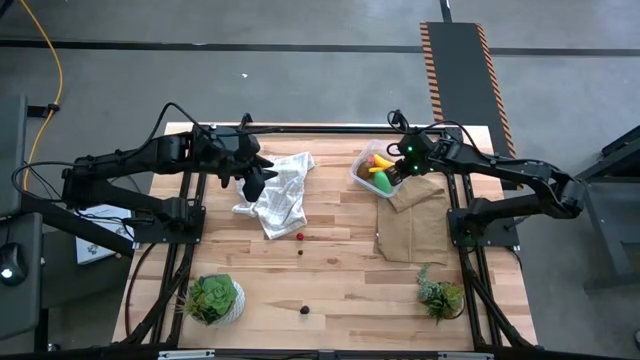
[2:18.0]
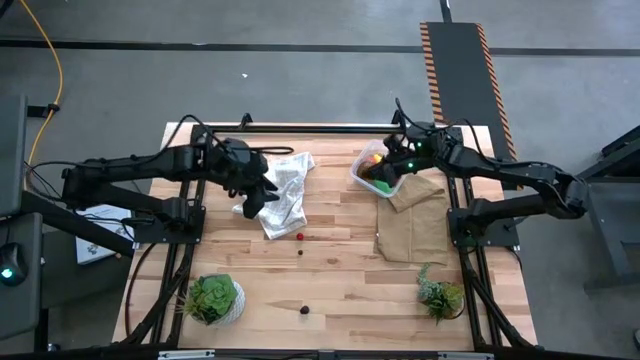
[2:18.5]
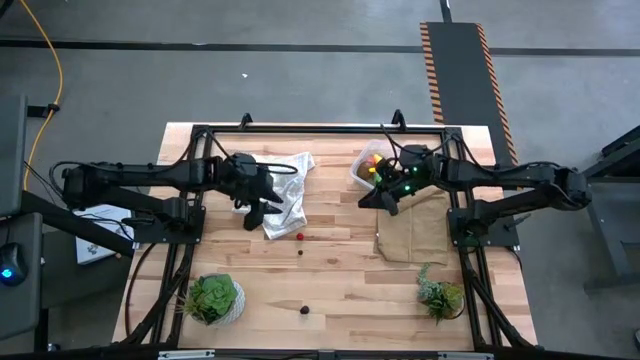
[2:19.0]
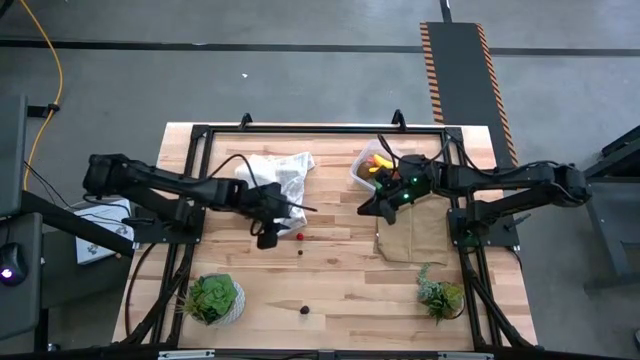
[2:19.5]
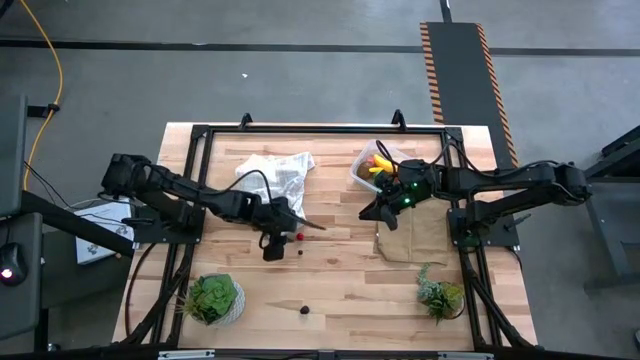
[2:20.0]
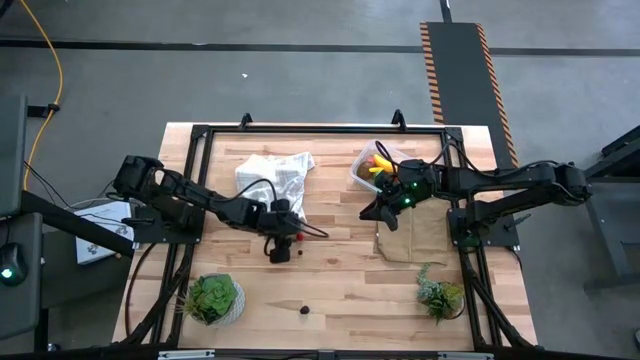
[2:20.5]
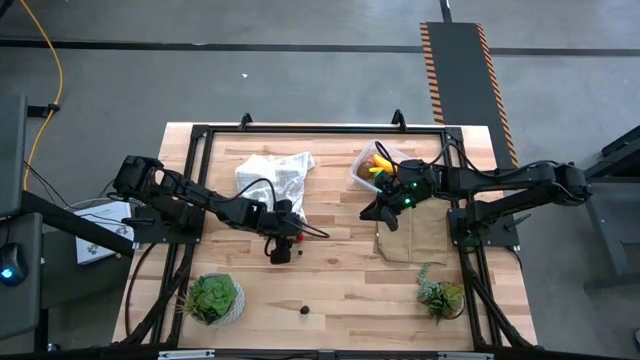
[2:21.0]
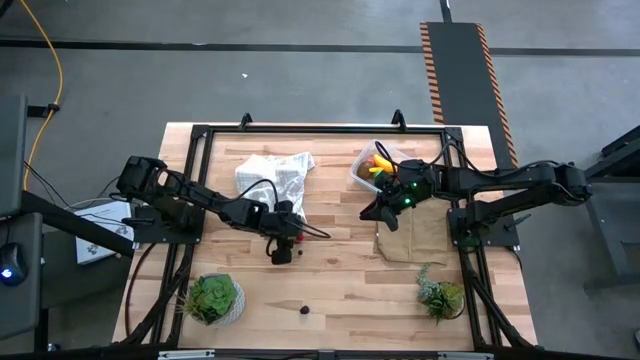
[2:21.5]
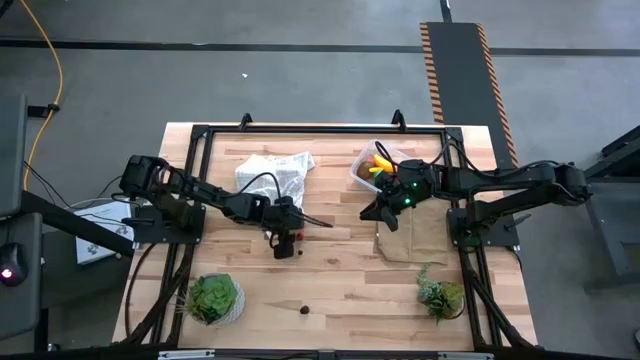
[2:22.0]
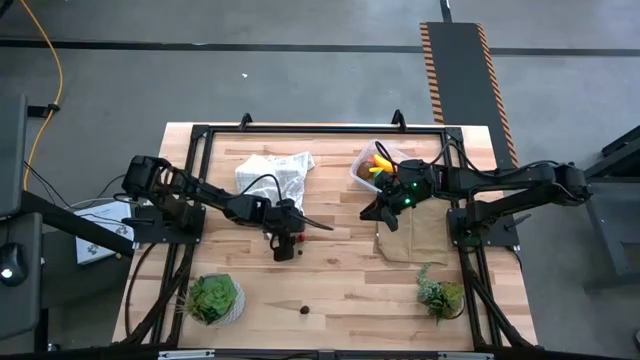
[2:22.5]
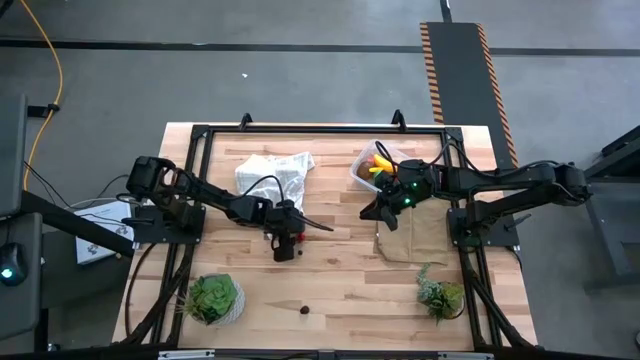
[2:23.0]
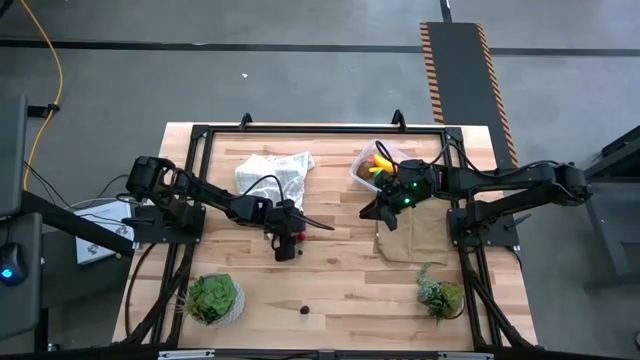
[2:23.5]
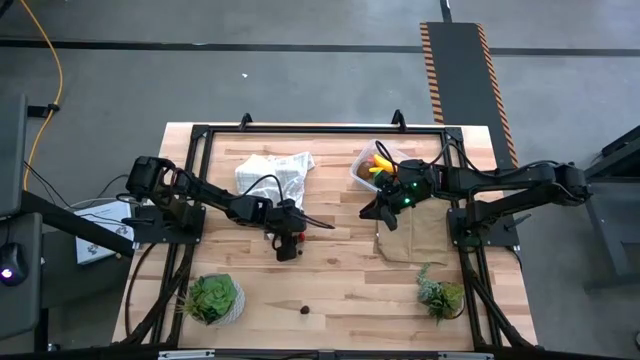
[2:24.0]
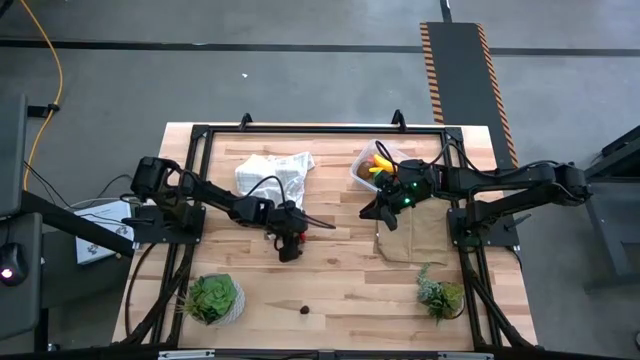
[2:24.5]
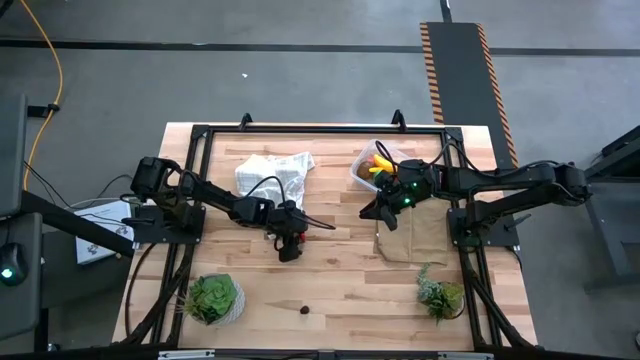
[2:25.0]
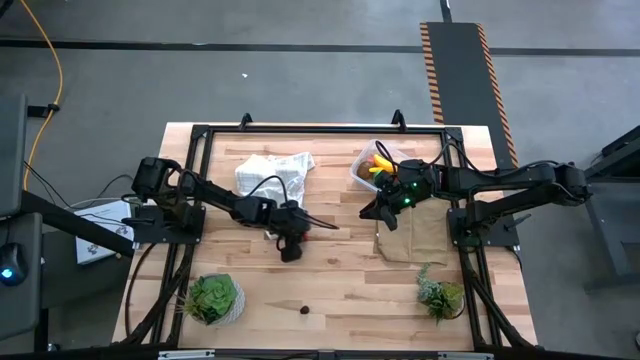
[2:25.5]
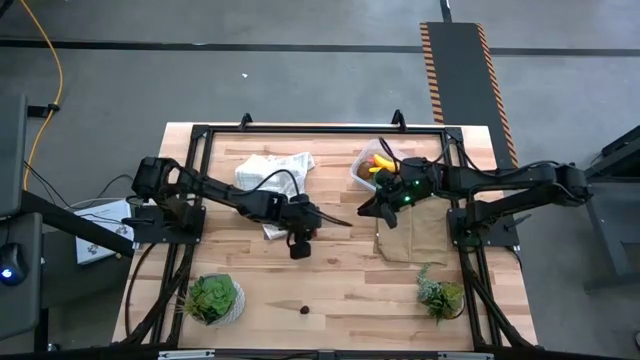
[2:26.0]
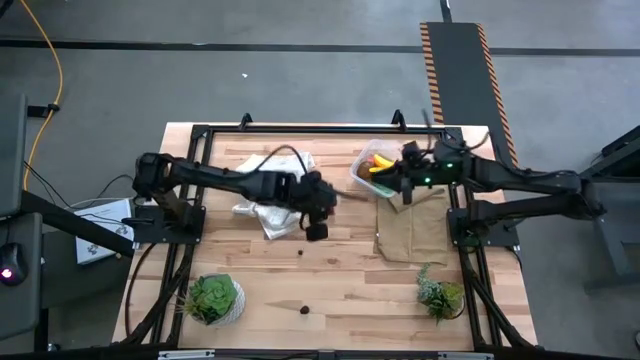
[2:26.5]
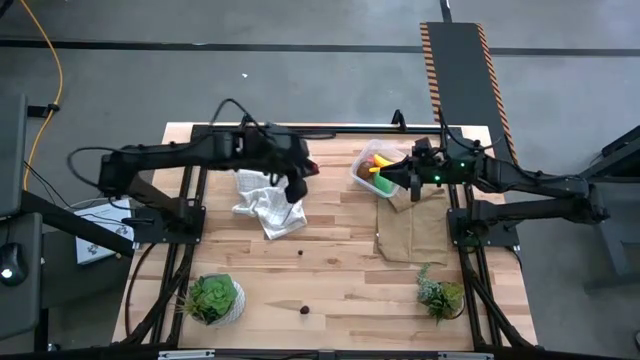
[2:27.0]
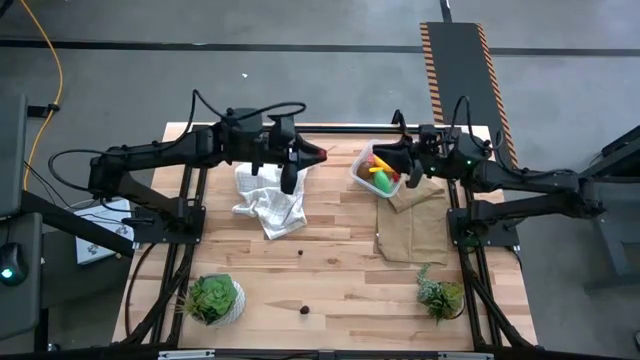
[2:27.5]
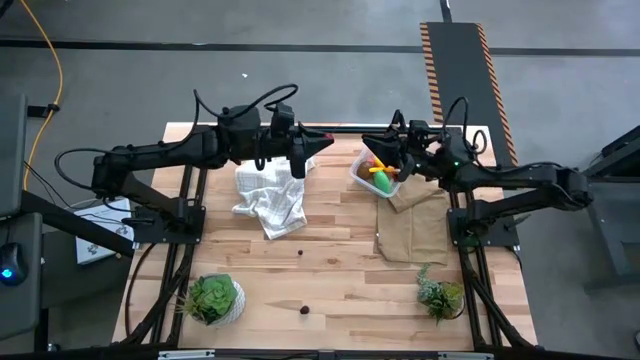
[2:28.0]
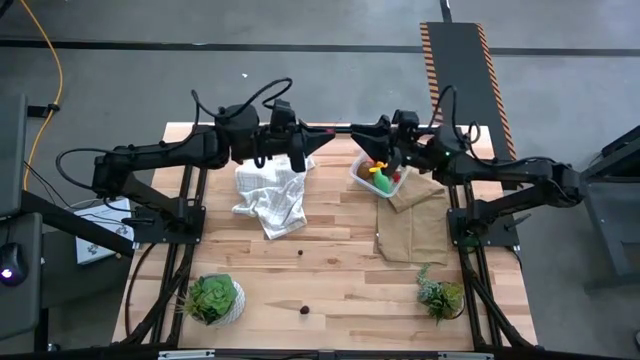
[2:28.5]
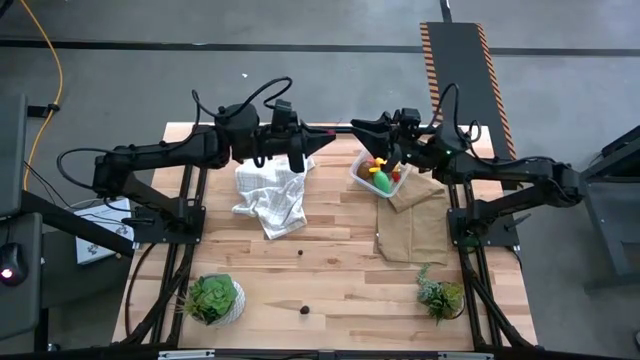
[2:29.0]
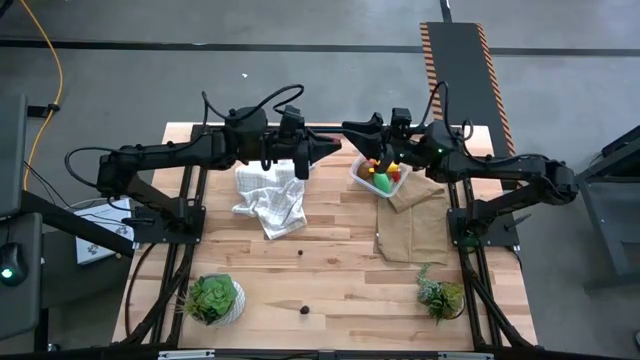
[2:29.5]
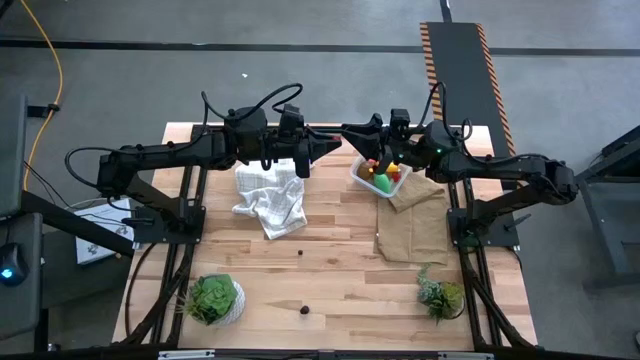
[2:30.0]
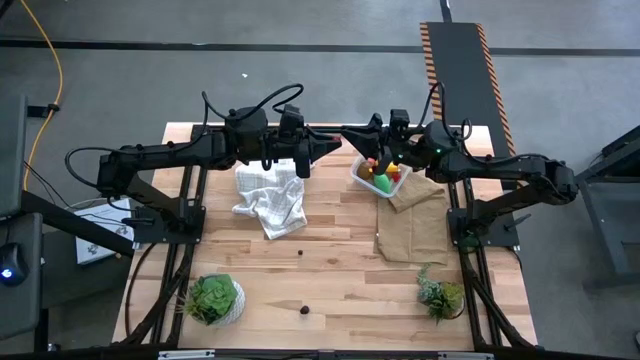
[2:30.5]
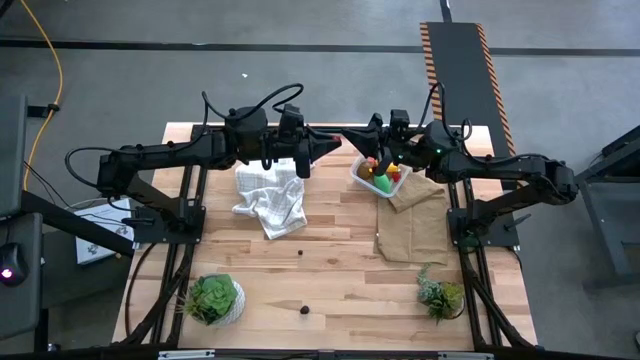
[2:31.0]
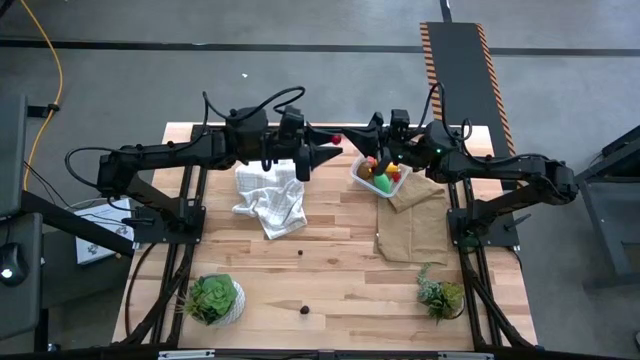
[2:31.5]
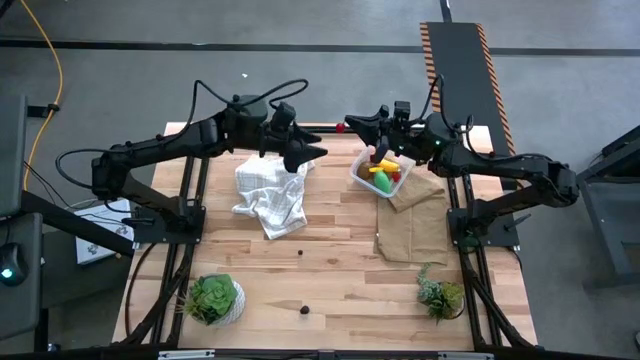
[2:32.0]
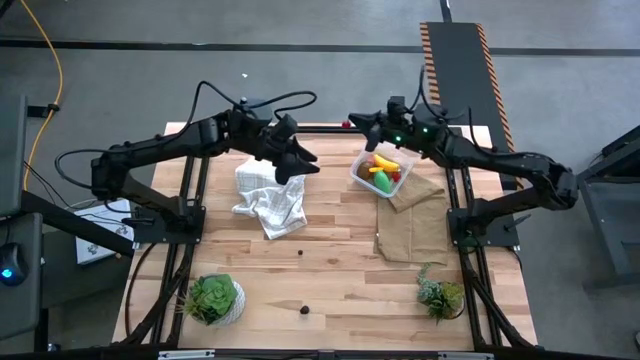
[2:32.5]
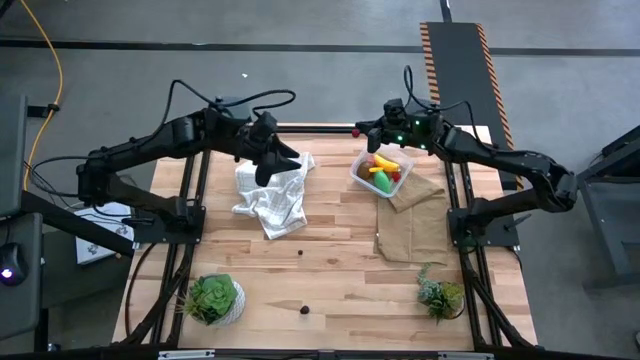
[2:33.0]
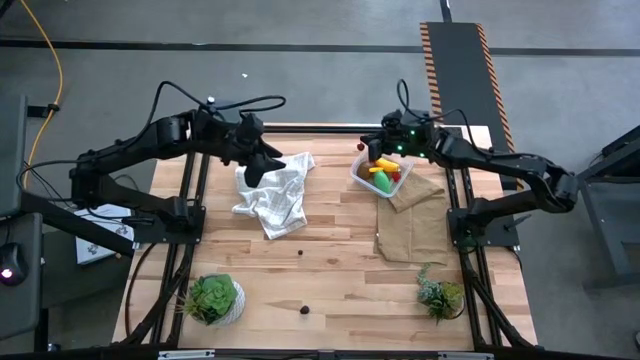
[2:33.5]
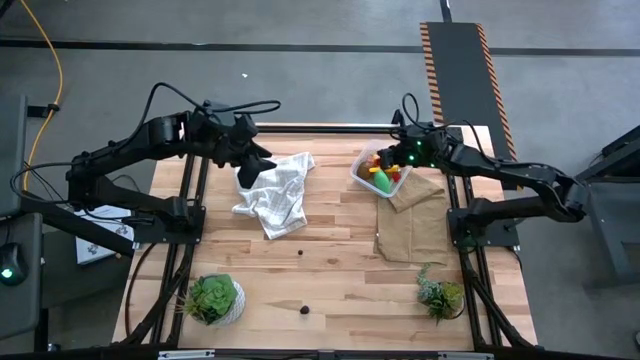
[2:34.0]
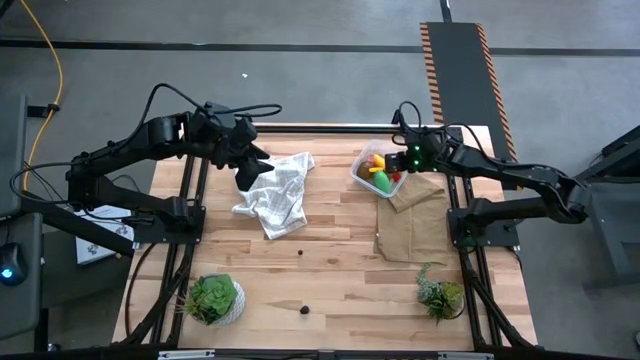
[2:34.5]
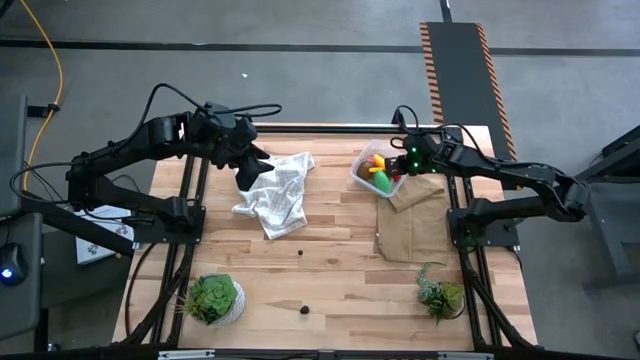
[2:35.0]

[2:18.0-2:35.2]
Task: Pick and placing Produce into tupperware
Put the red cherry into the transparent bin
